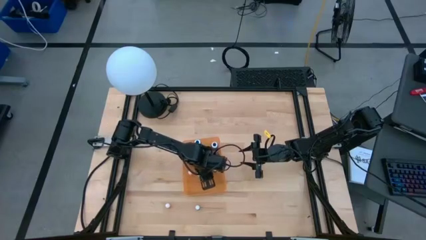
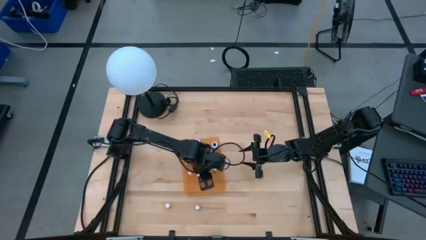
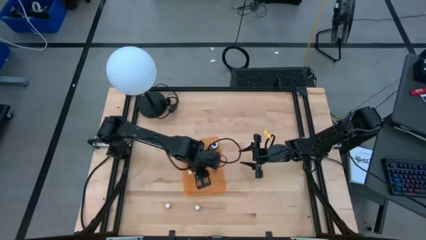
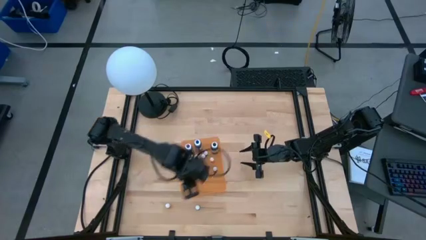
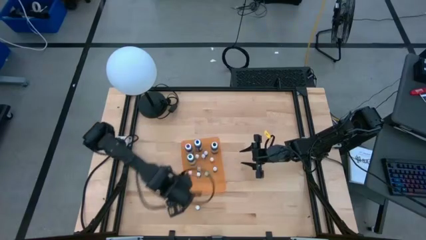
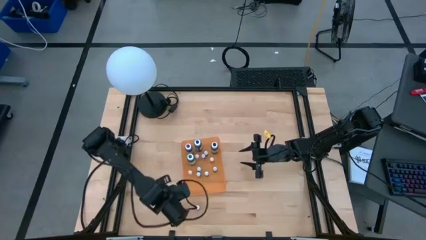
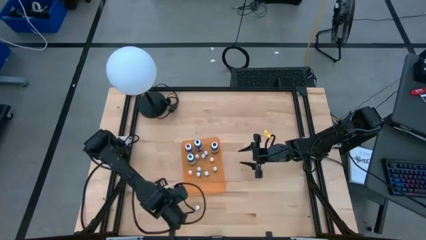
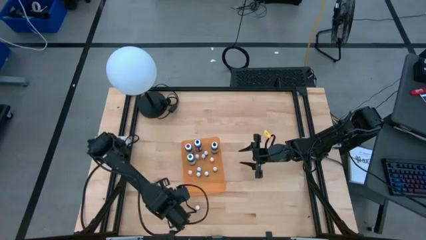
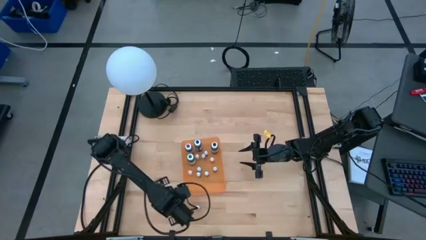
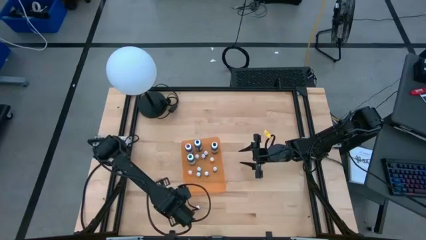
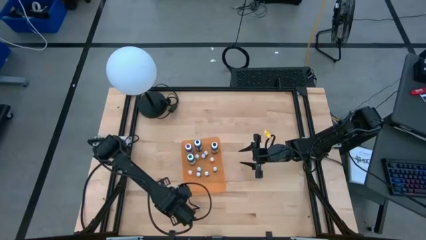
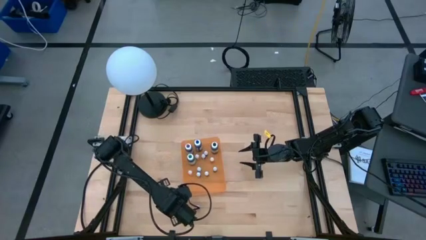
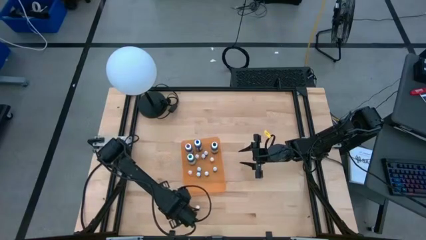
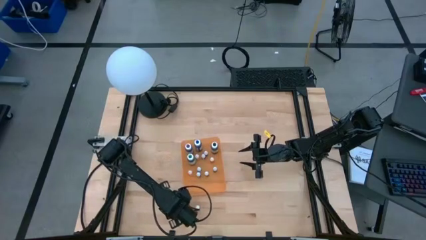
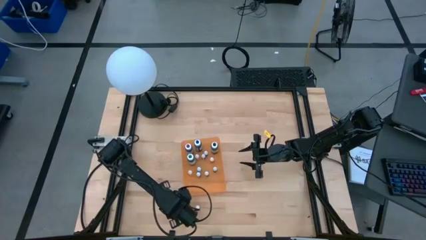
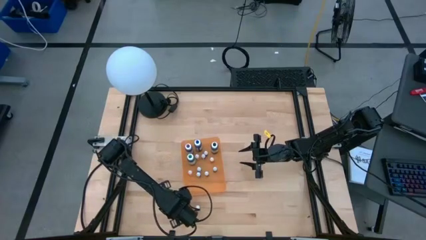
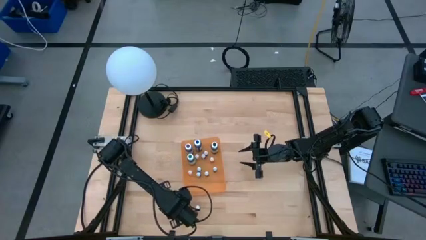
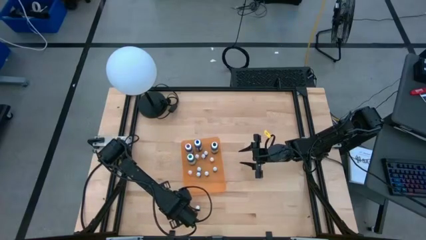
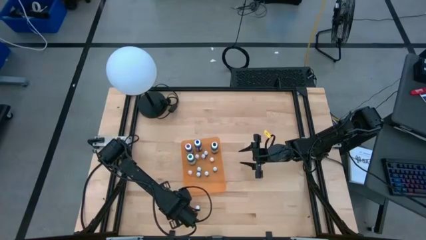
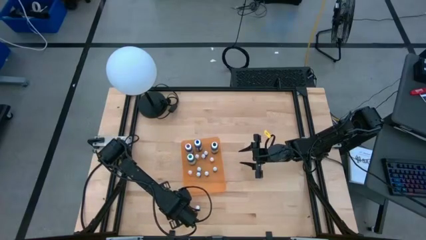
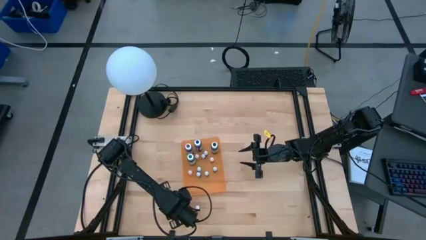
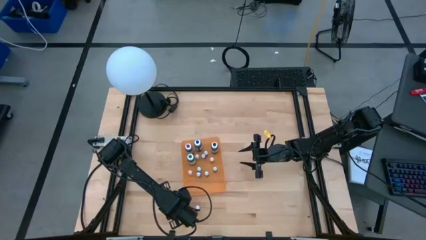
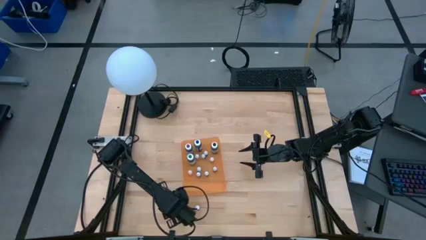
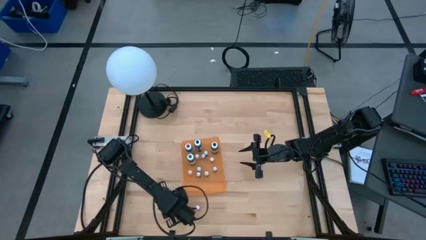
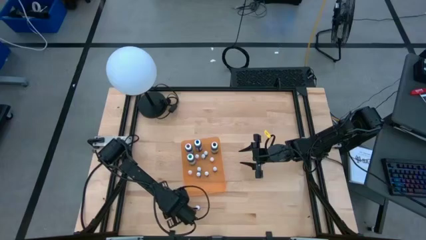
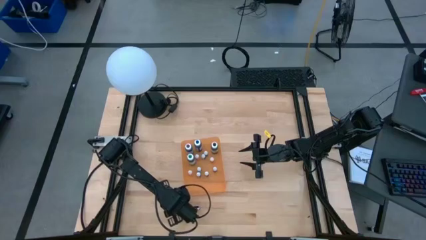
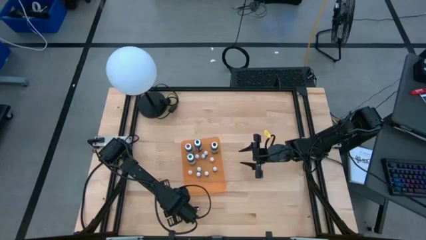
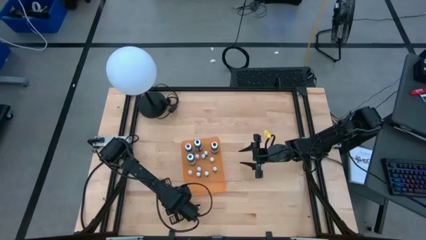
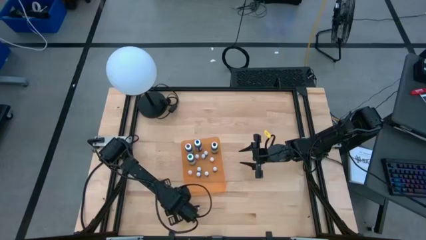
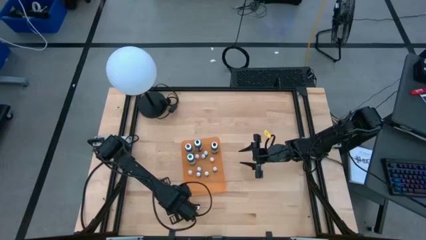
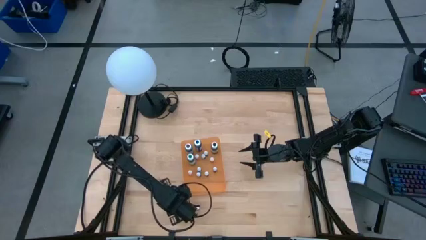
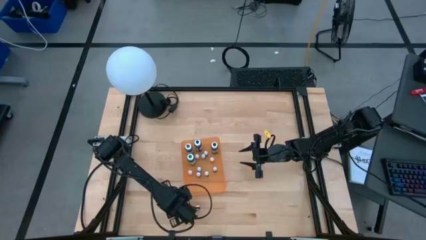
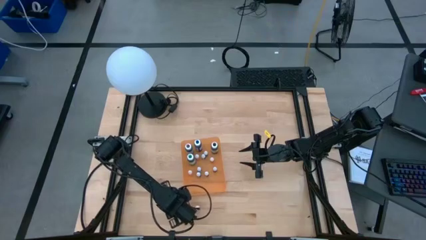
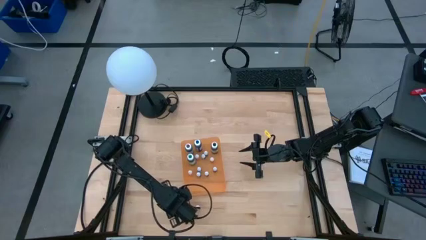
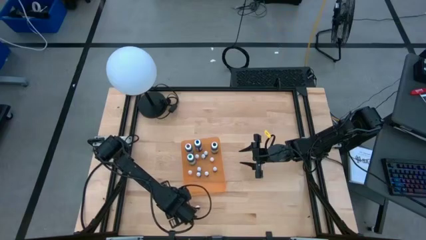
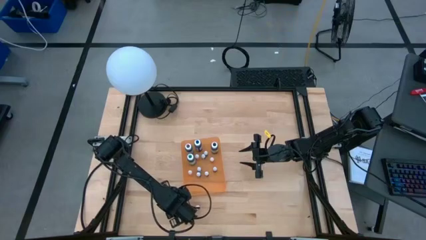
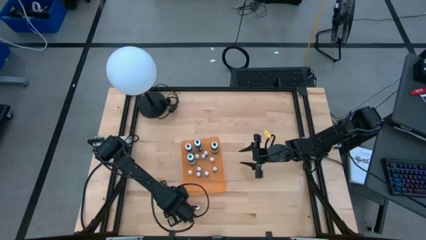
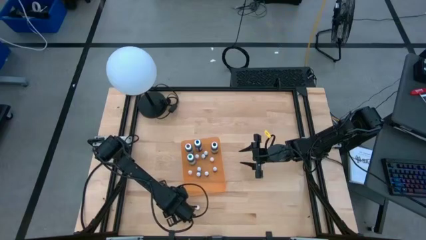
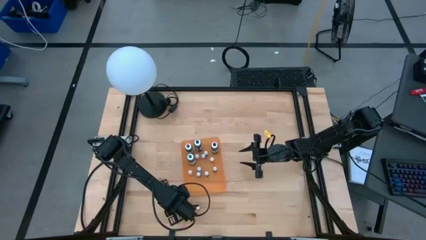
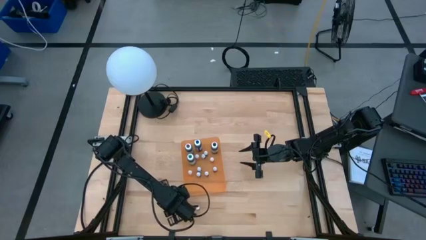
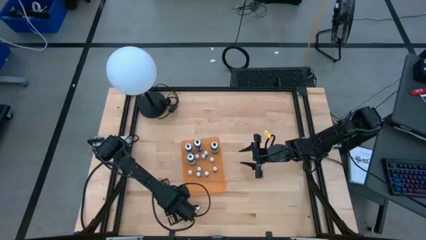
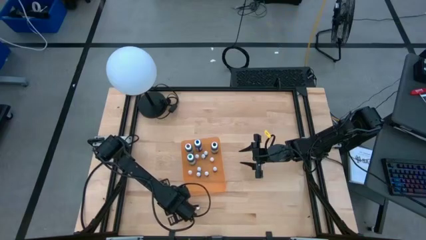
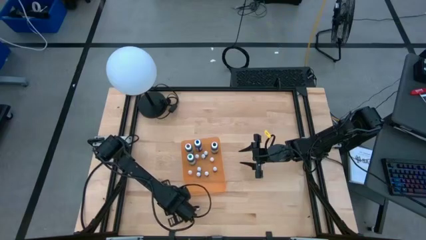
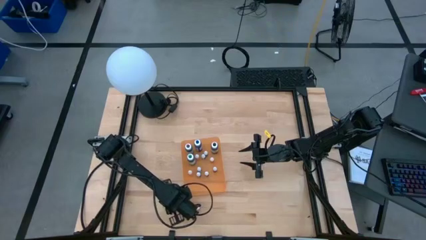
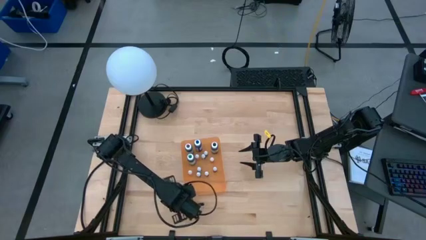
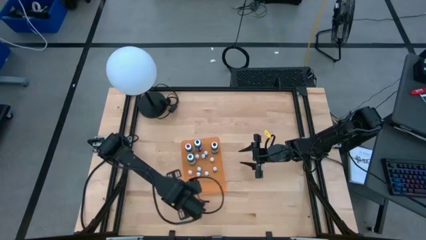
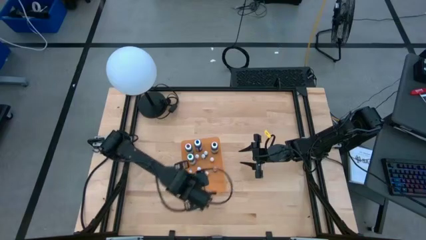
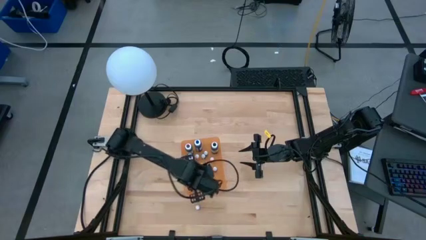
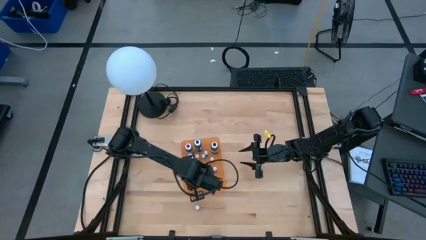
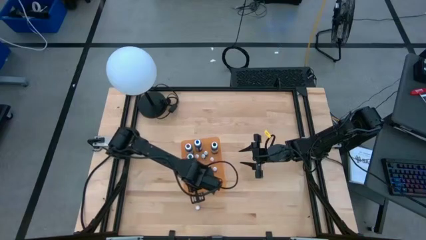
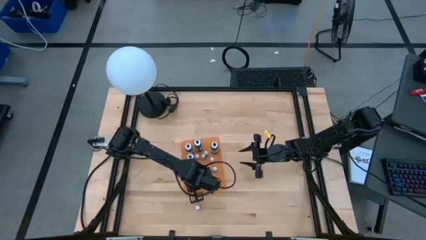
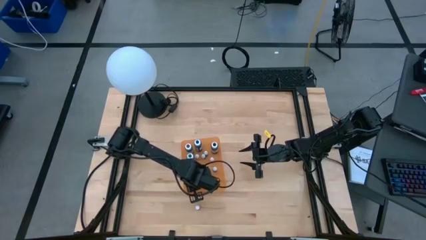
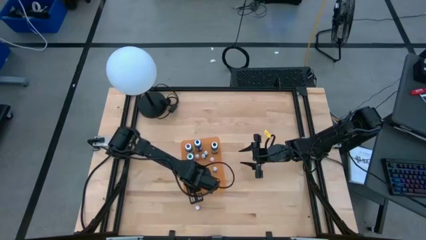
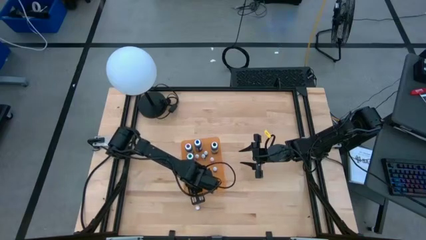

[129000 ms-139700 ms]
Task: Pick & Place food coloring
Put the small orange food coloring bottle into the orange bin

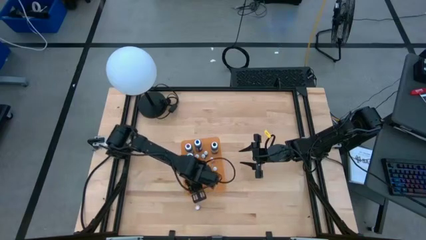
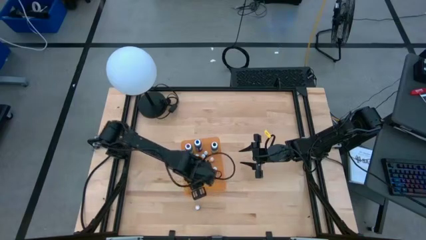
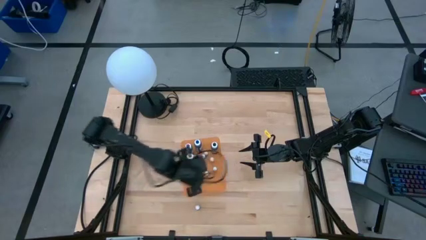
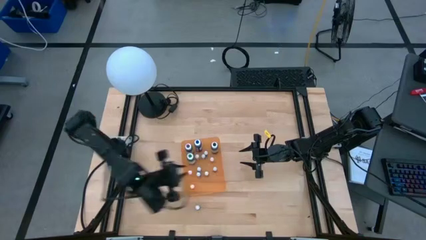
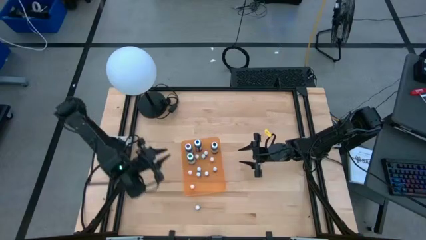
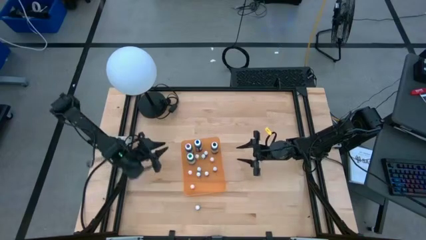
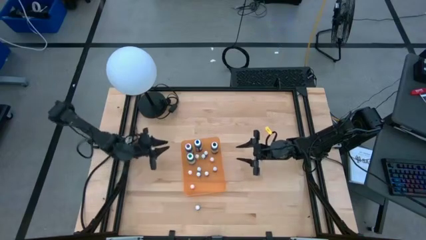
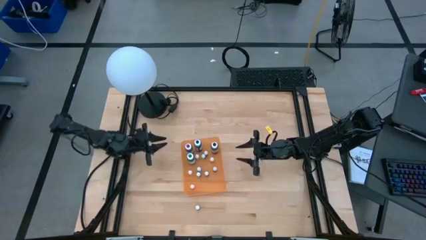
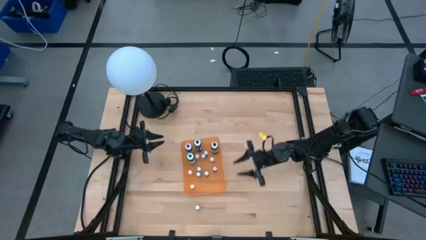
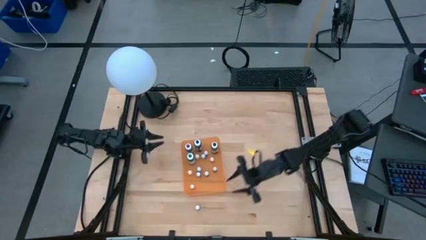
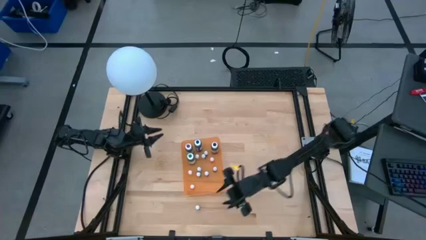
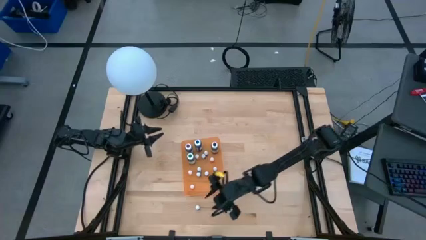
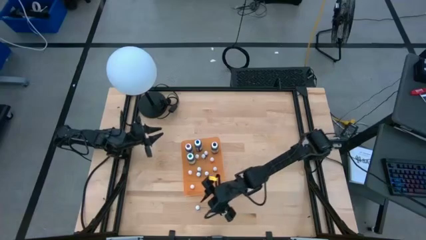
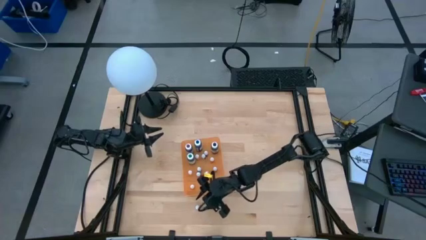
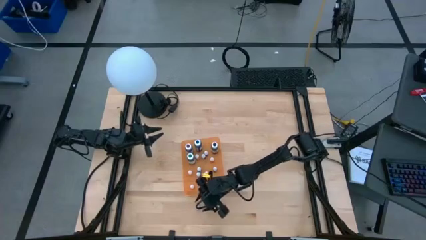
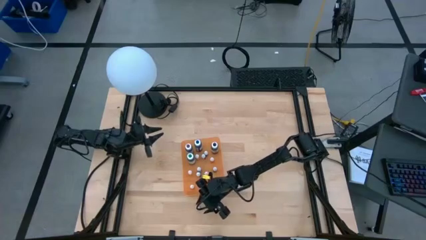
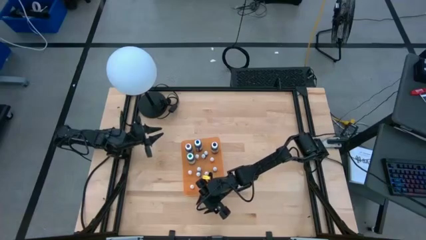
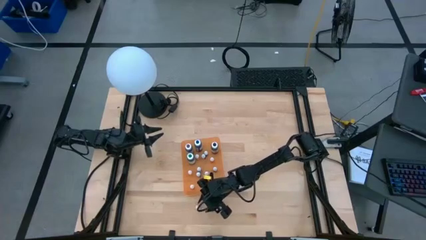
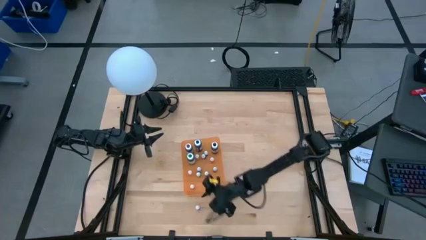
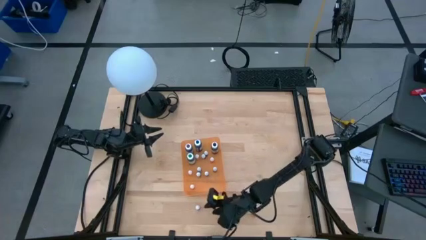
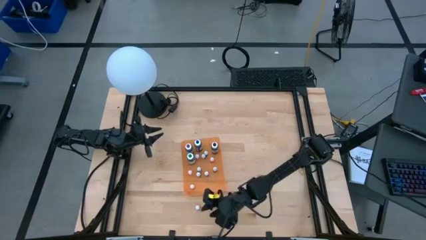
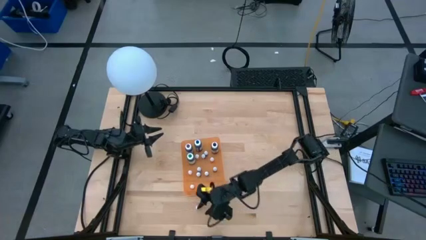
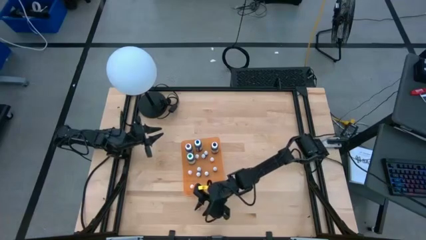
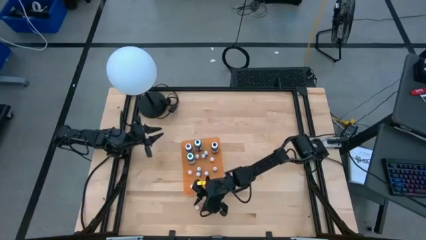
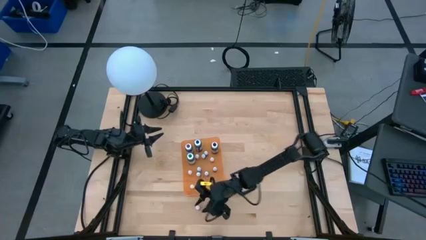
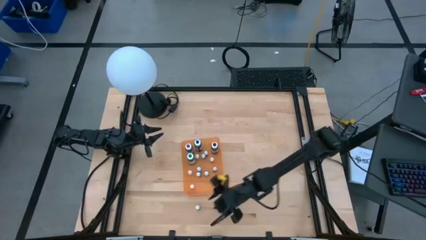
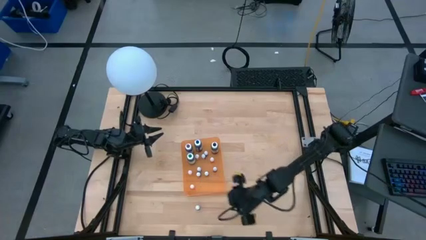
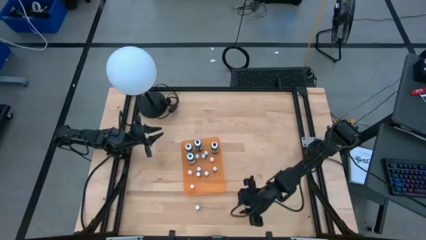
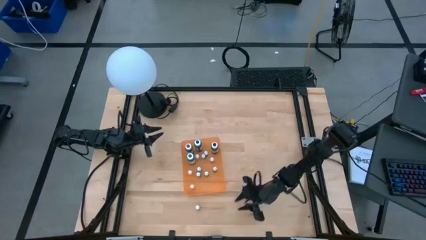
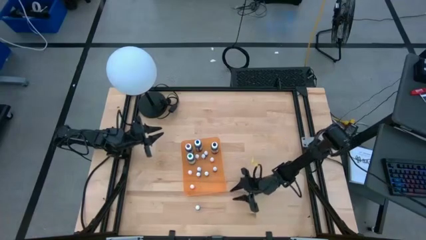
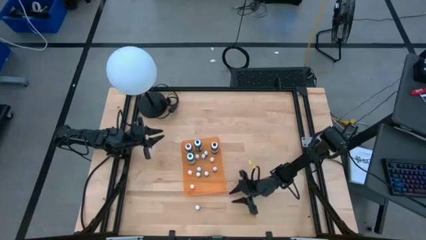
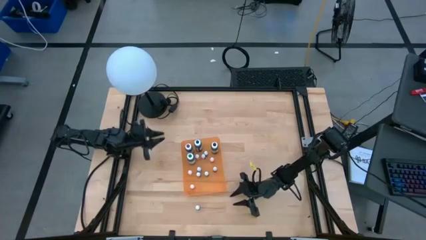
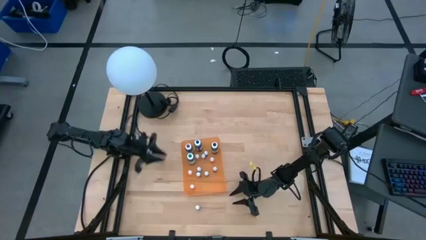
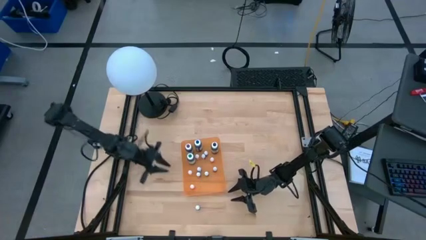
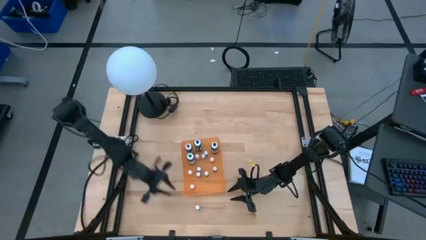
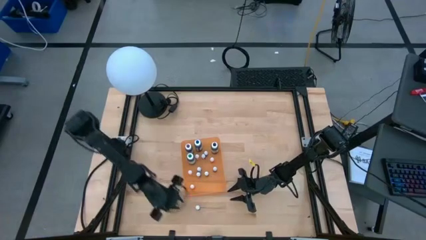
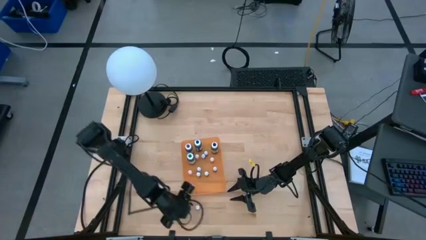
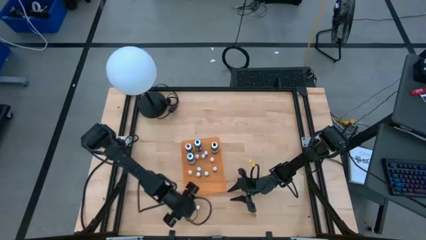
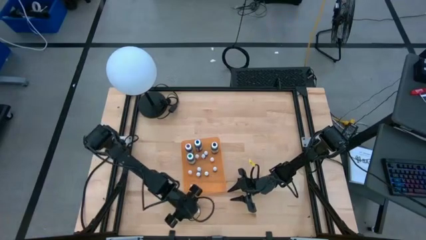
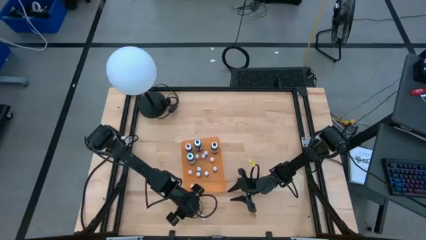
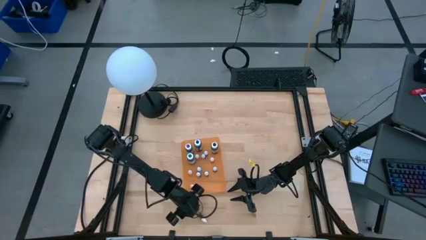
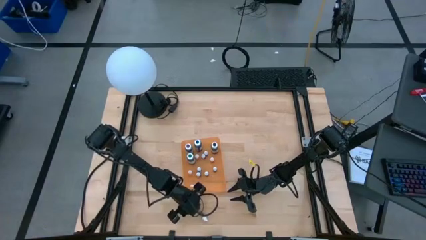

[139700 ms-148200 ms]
Put the small orange food coloring bottle into the orange bin
